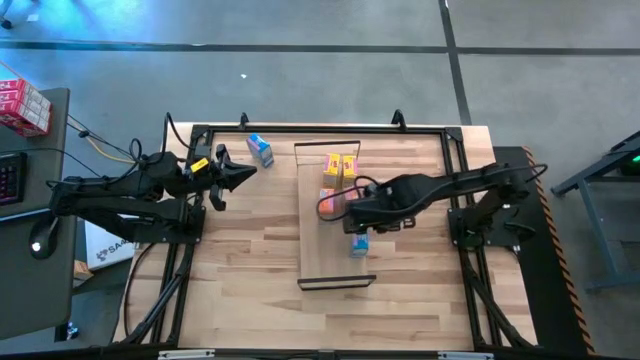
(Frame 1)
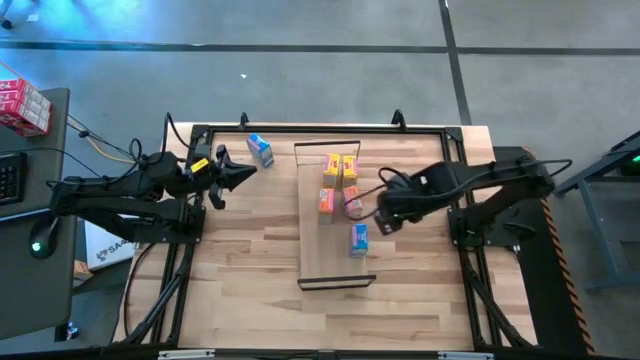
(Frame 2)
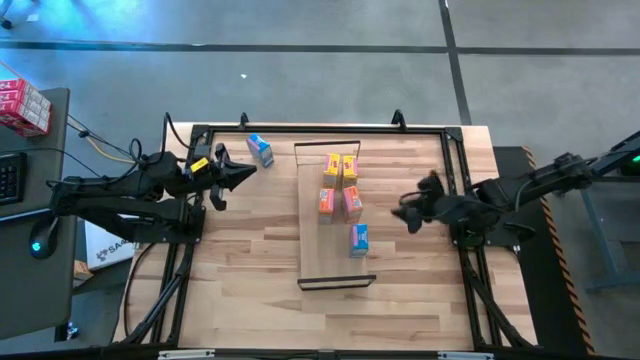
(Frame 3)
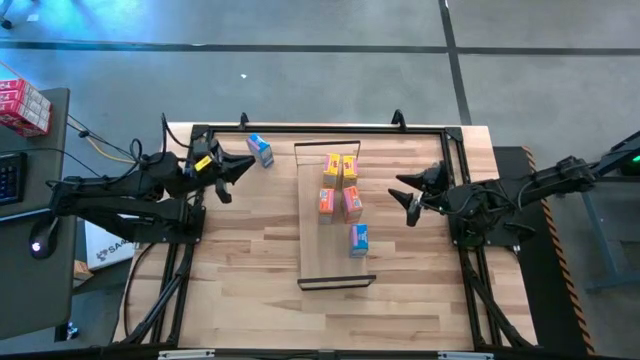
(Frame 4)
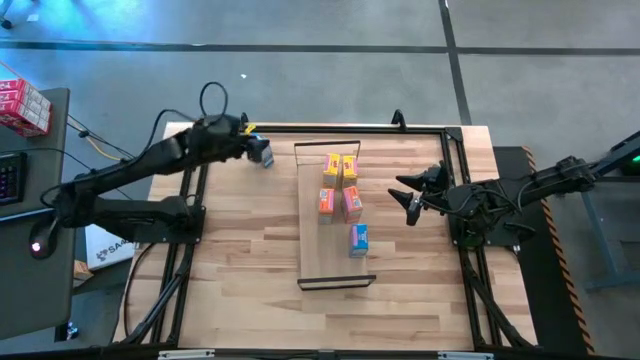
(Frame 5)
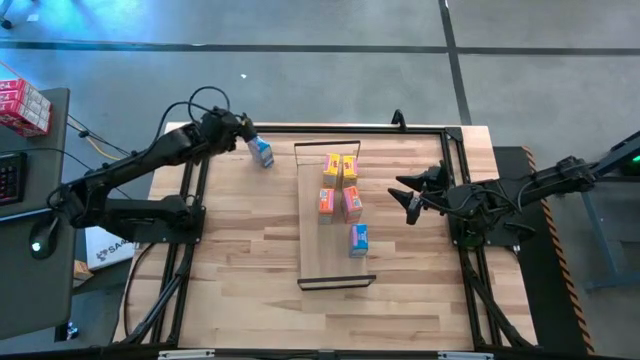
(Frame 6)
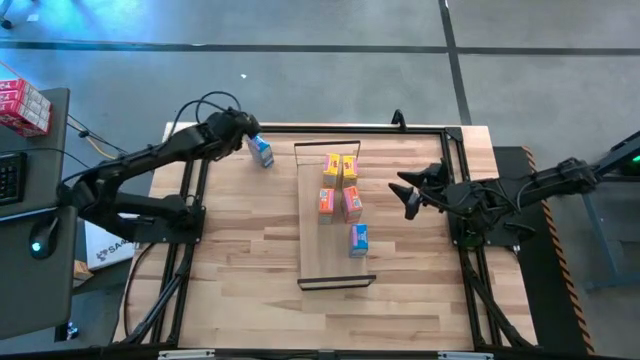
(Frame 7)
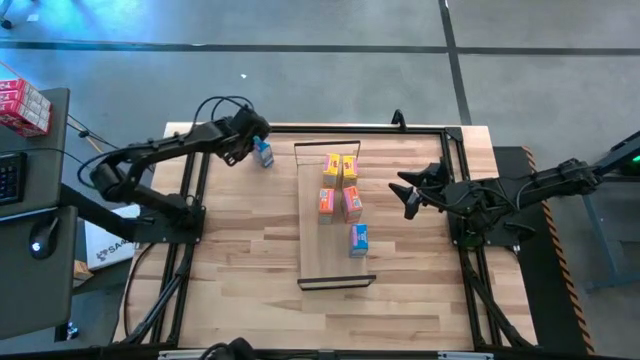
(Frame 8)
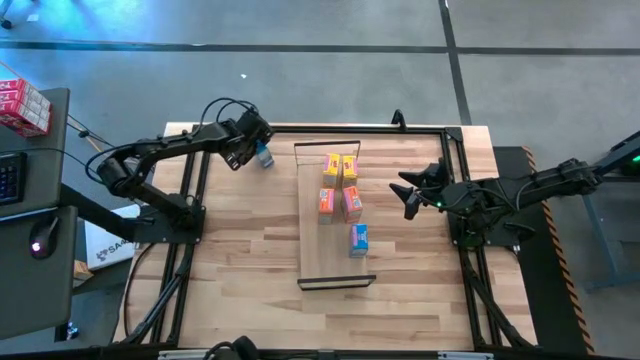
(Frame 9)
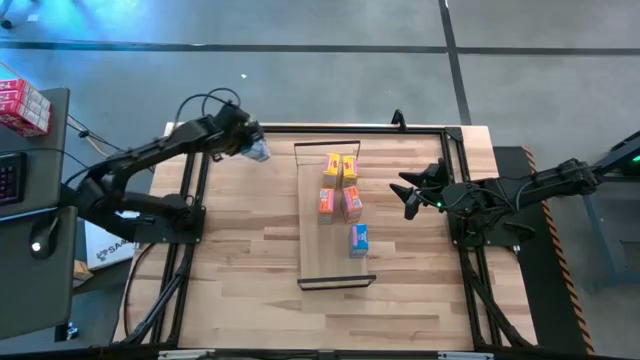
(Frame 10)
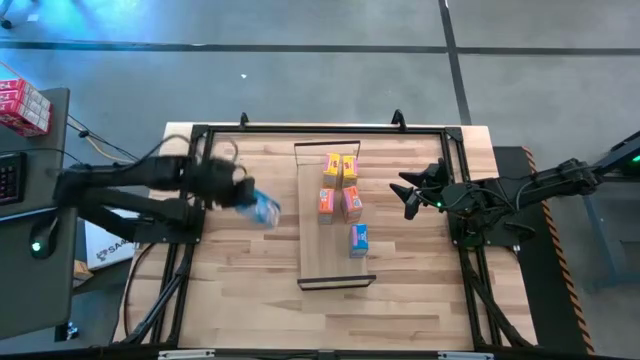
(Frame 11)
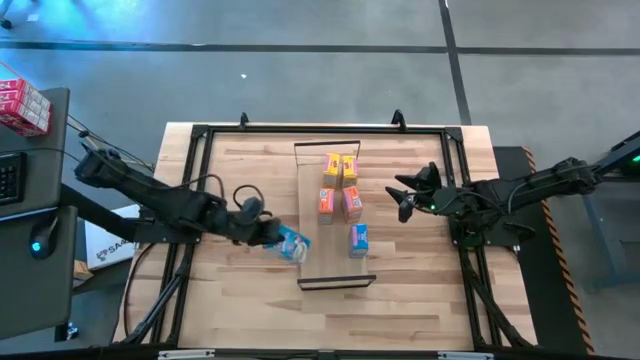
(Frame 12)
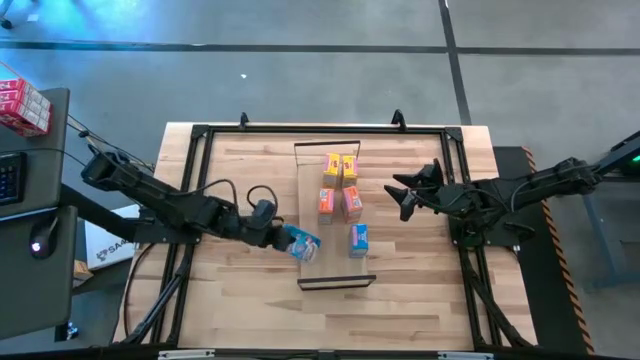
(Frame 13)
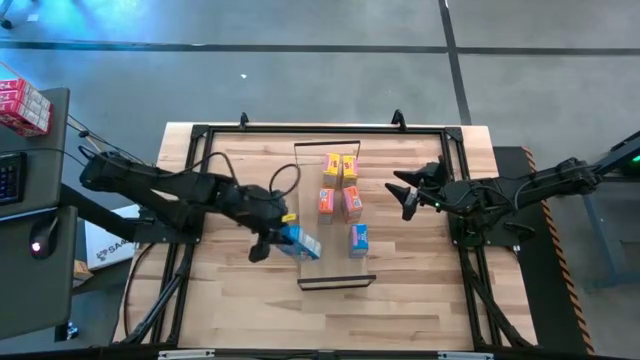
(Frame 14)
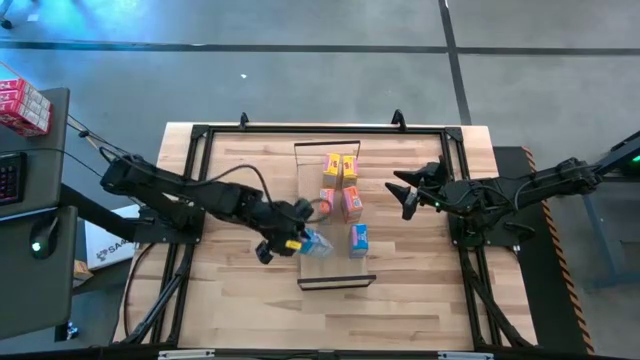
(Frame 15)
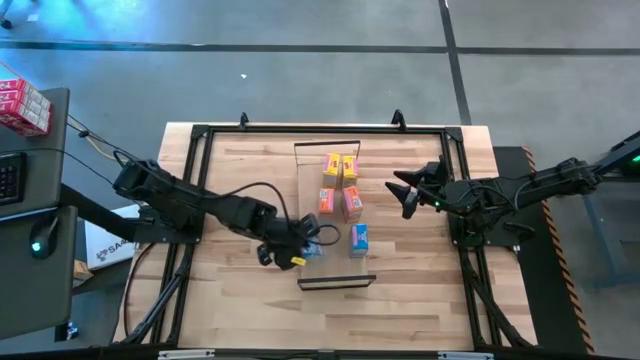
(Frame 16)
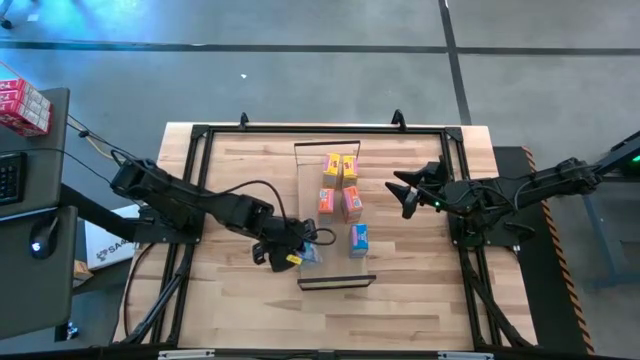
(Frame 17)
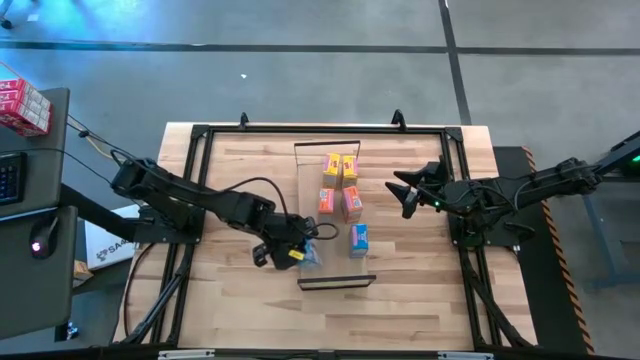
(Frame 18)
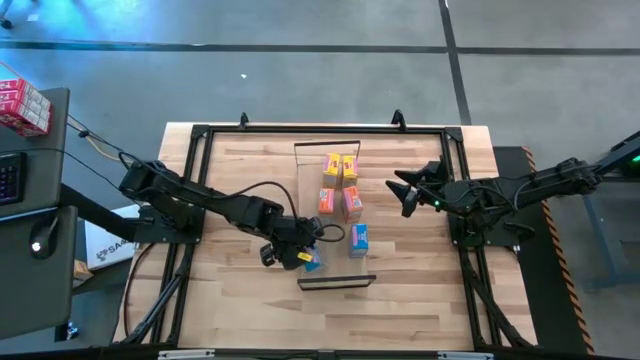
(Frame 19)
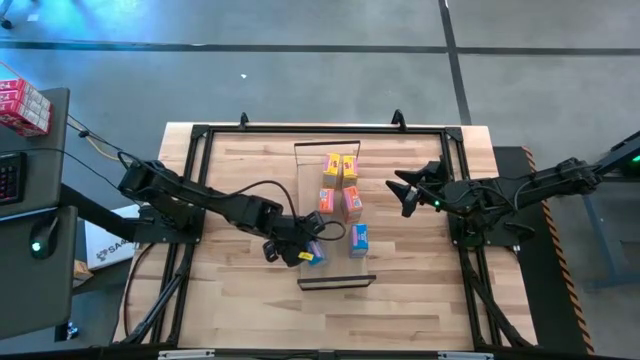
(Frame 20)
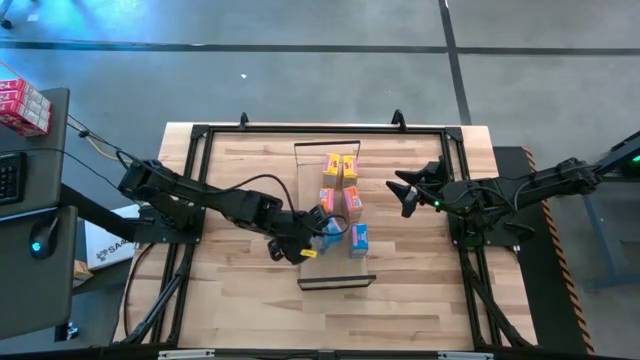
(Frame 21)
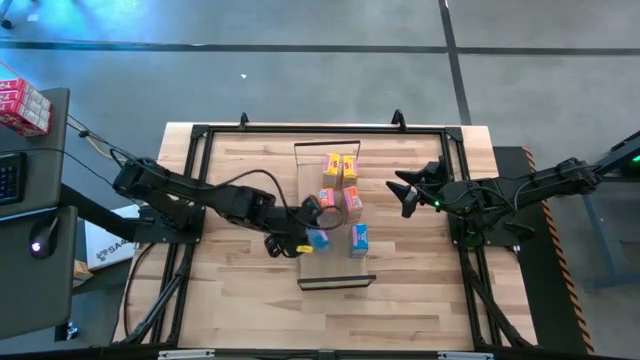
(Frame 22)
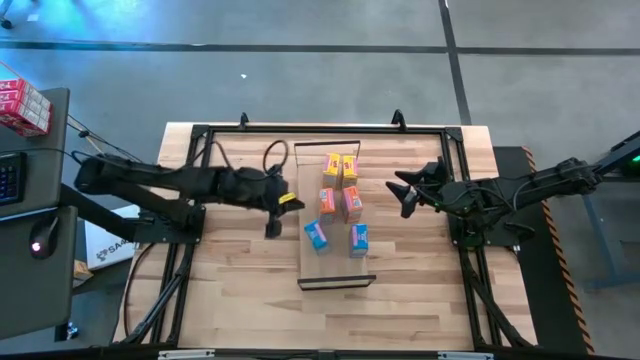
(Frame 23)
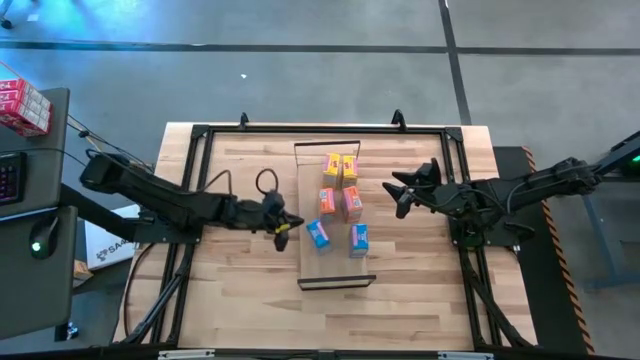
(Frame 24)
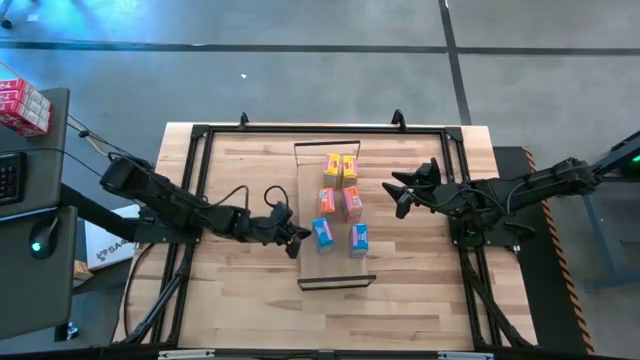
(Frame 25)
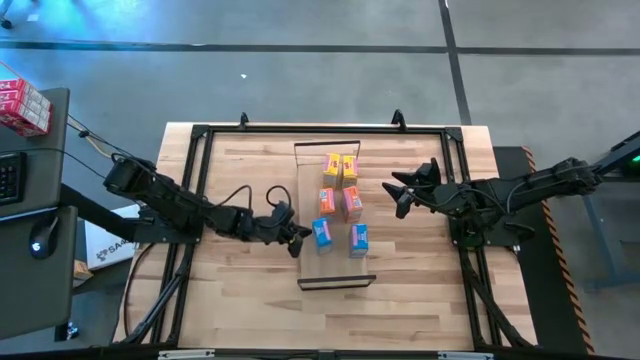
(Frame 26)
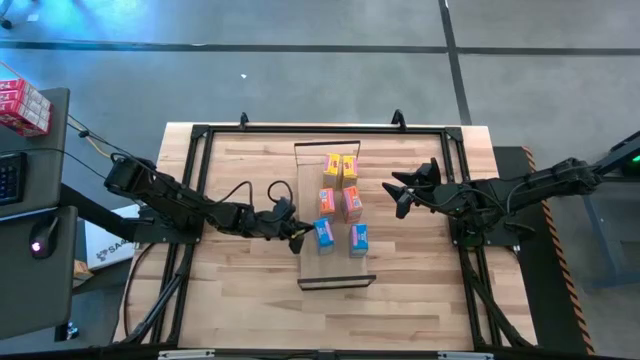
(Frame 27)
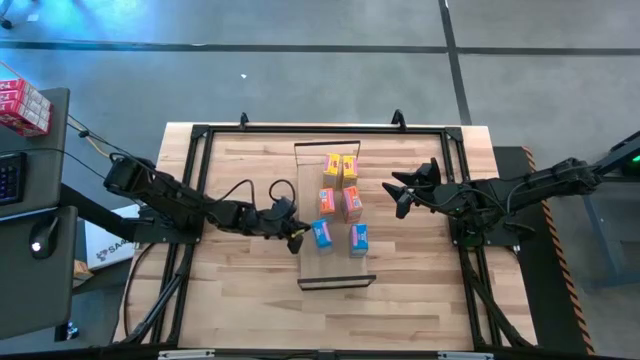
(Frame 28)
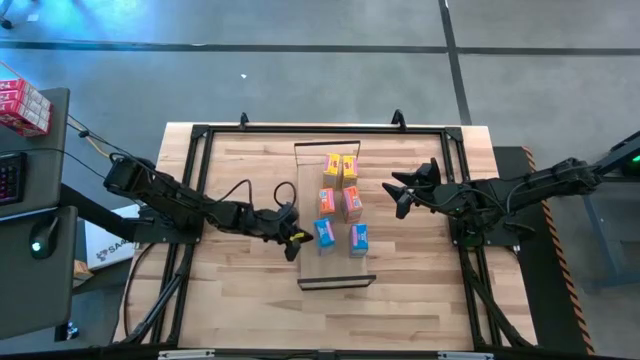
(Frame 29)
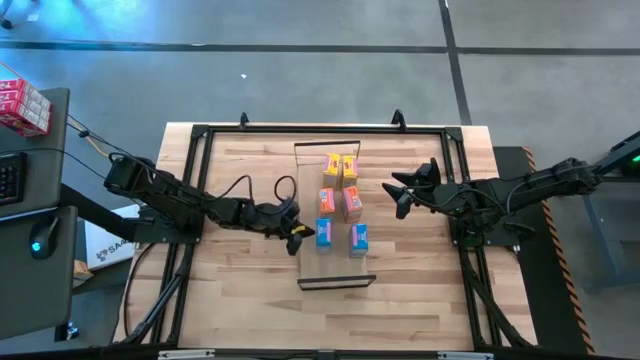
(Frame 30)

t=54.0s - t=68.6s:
Task: Stack cereal on shelf
Stack the blue cereal box on the shelf aligned with the other blue cereal box

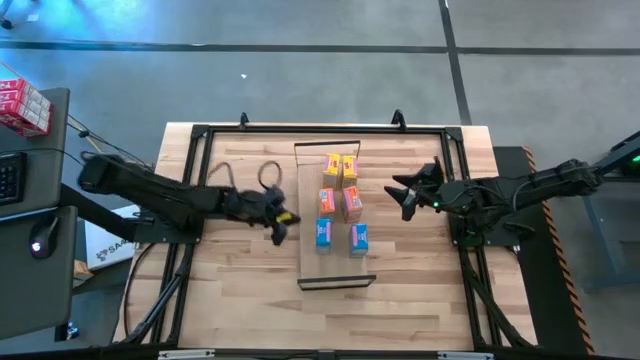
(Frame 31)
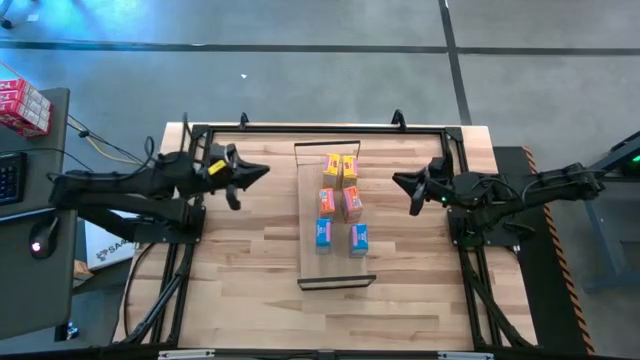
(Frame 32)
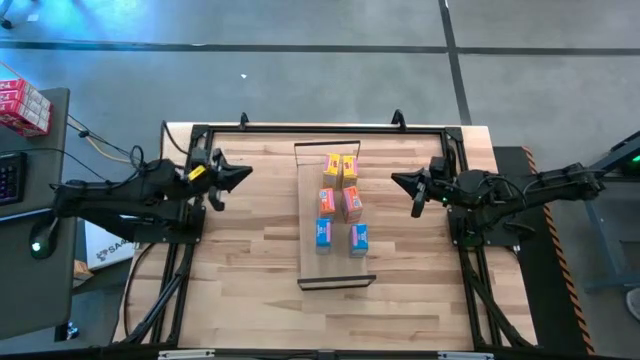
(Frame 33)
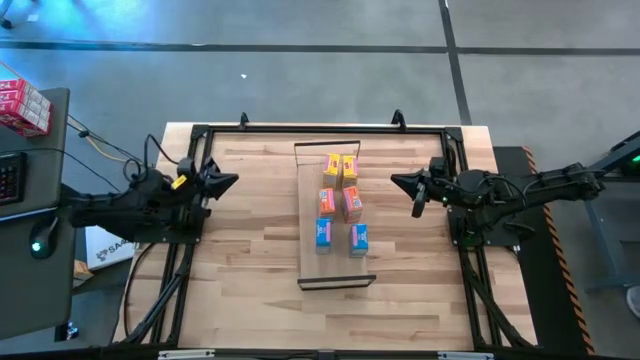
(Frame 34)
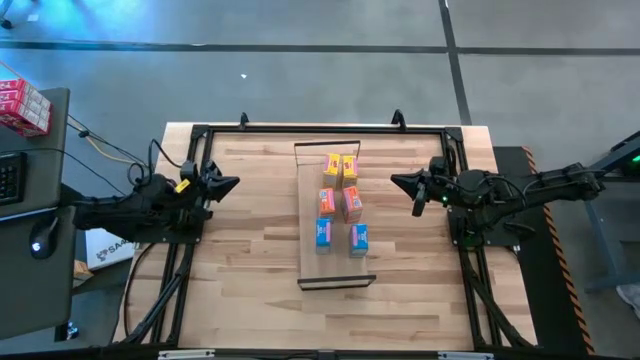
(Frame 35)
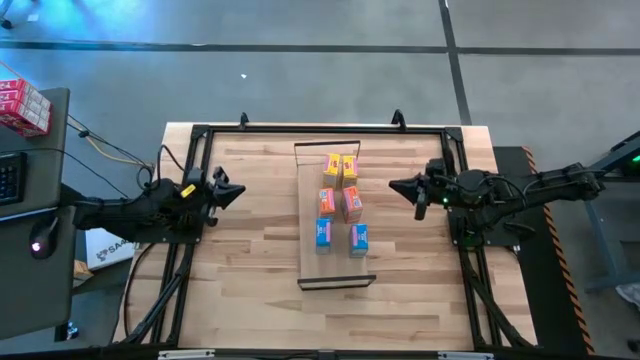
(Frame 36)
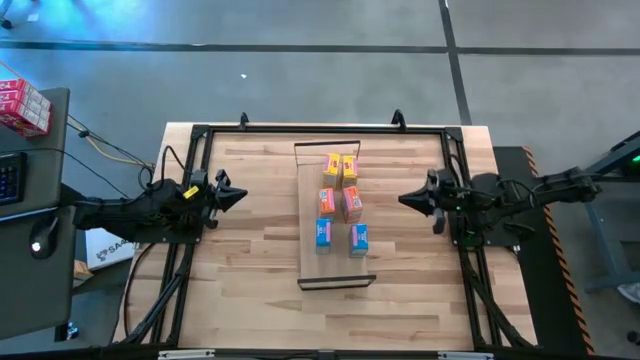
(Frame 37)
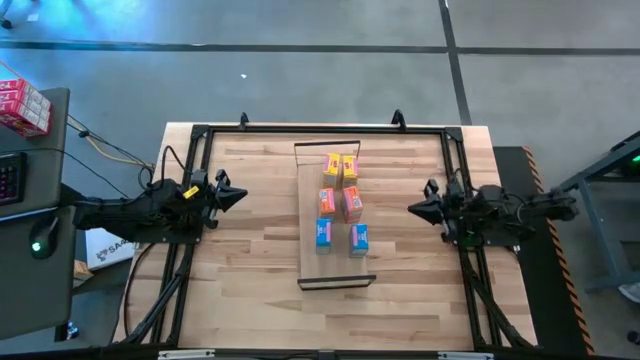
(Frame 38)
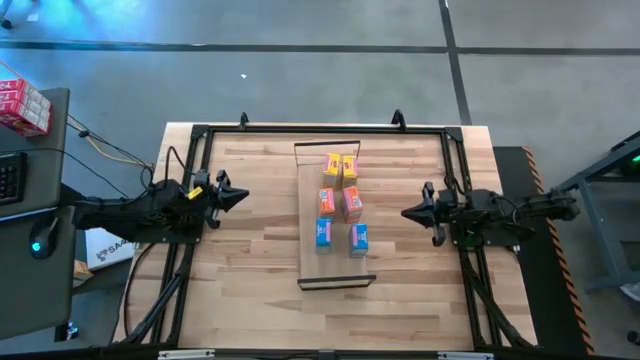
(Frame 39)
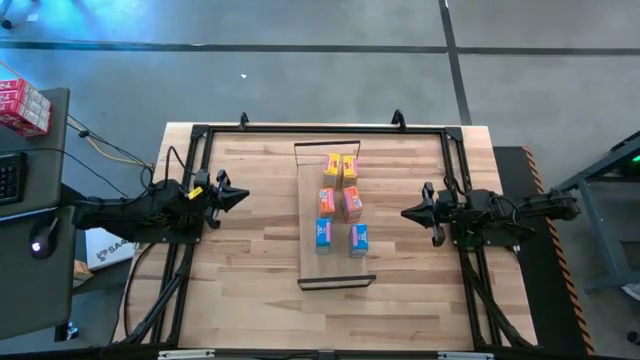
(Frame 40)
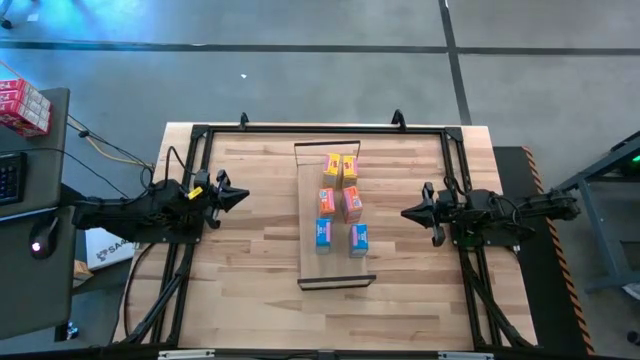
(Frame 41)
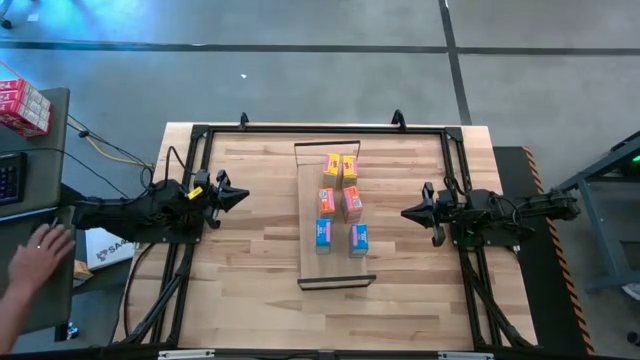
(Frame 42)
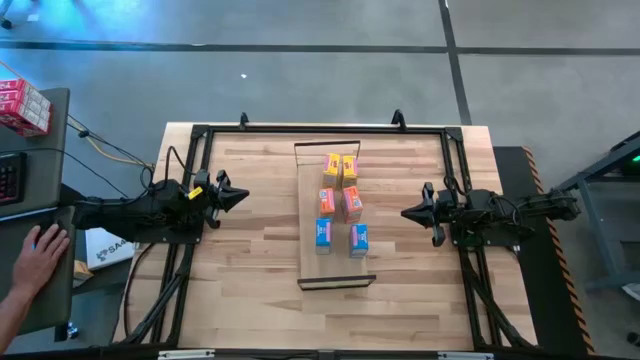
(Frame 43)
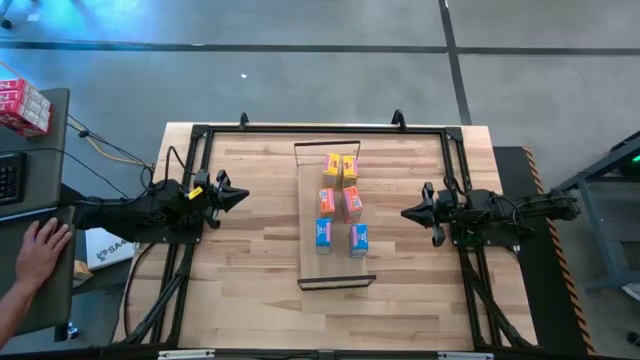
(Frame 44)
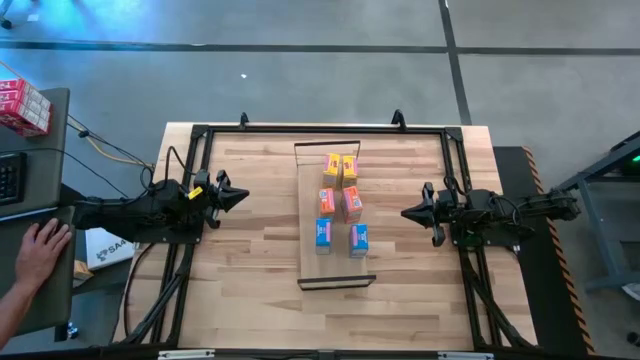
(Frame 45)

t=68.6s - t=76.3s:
Return to Home Position
